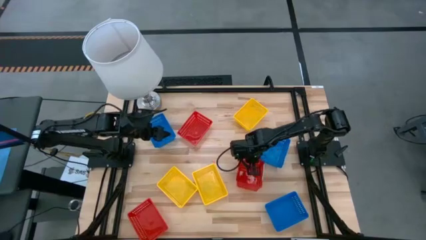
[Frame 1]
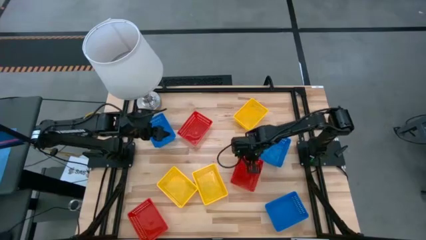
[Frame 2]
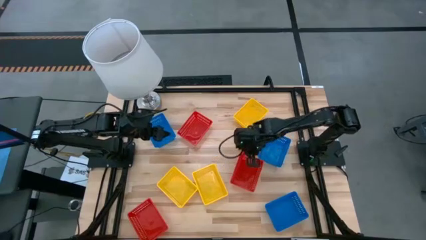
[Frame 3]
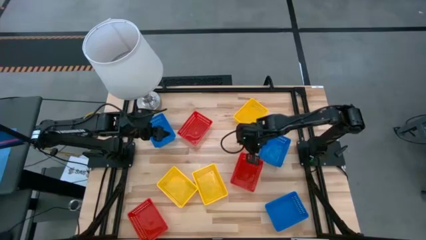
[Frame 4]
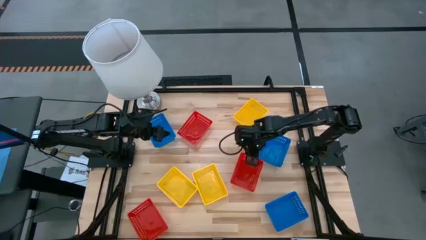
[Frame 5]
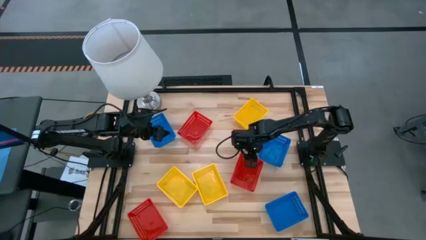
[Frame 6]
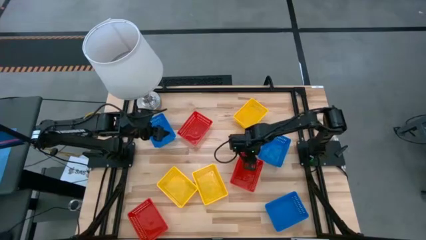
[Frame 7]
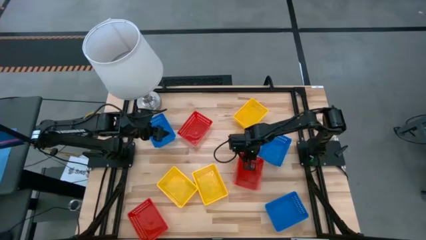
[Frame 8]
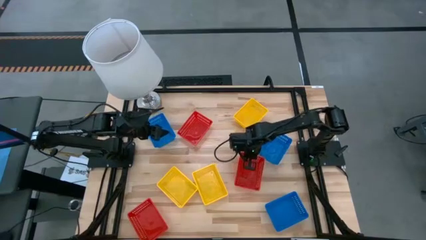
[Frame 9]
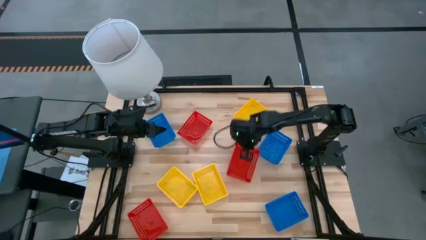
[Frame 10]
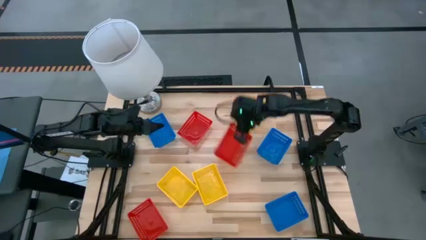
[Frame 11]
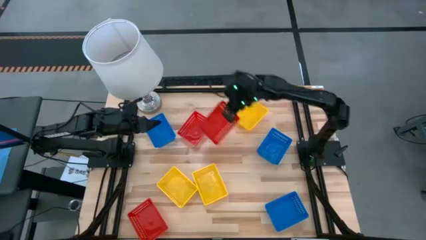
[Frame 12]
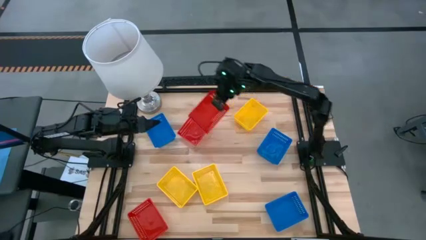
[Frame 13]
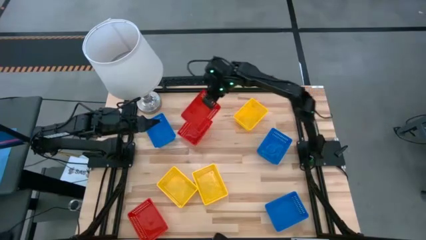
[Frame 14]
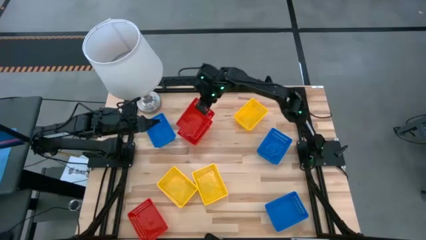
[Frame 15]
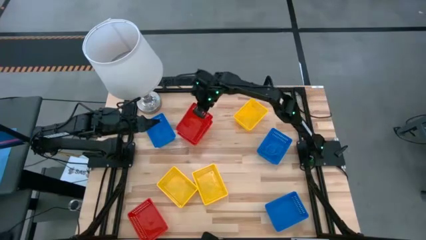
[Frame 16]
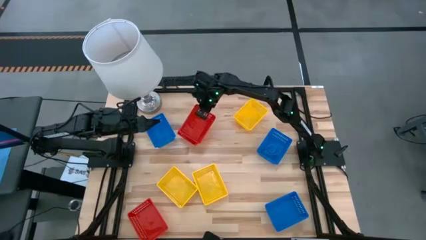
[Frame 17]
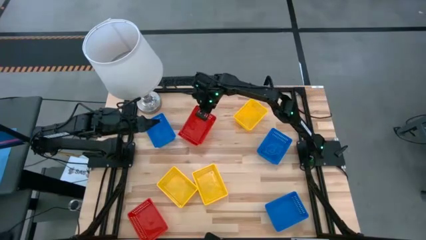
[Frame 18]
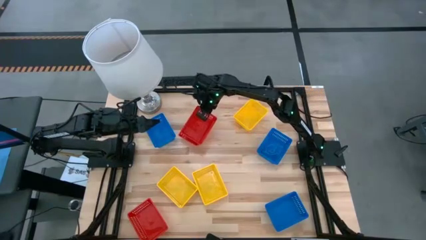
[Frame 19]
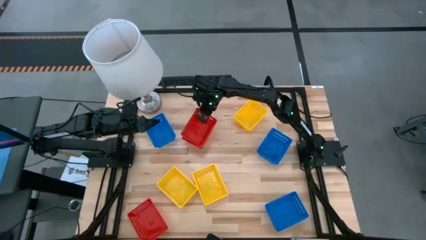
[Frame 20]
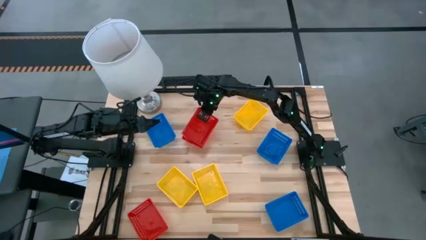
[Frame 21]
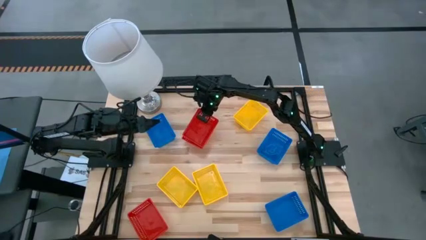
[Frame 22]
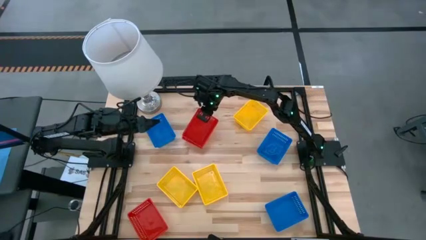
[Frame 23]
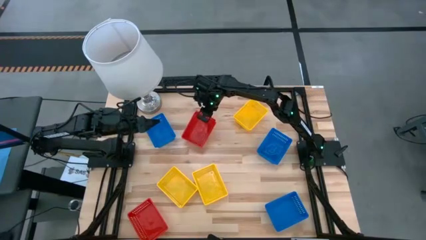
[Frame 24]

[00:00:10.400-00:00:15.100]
Stack the middle right red bin on the top red bin

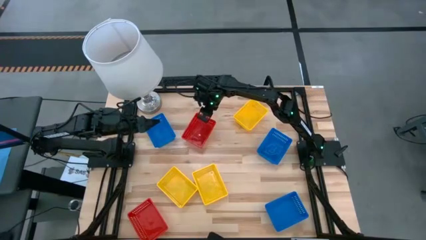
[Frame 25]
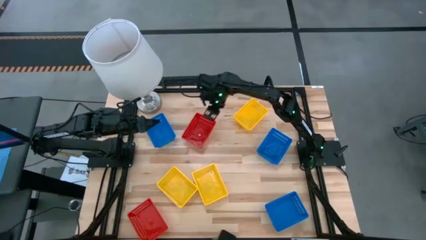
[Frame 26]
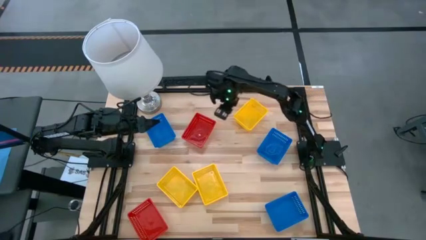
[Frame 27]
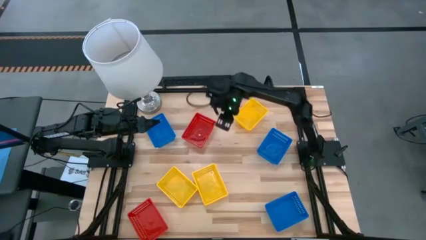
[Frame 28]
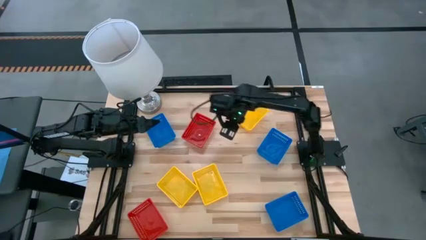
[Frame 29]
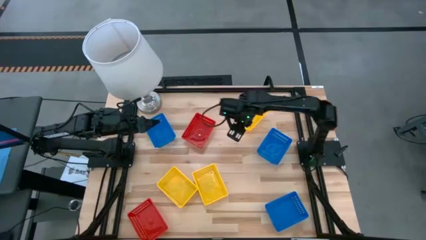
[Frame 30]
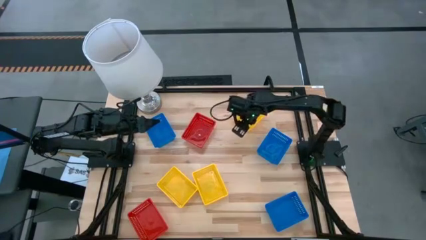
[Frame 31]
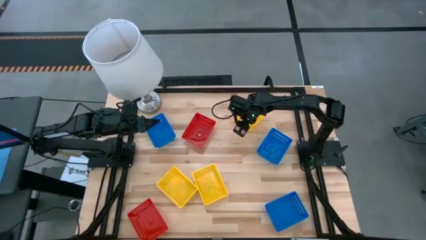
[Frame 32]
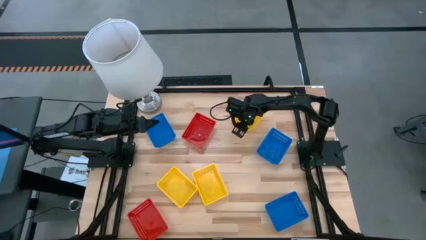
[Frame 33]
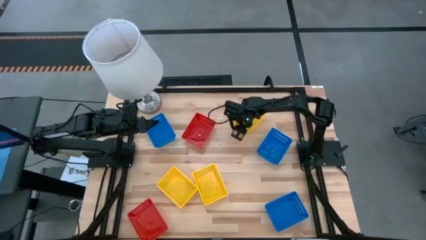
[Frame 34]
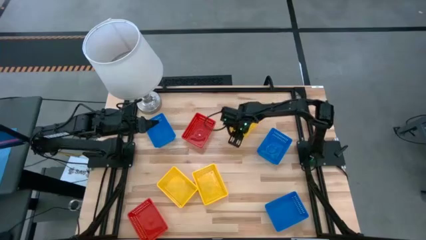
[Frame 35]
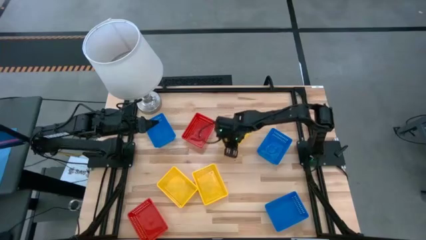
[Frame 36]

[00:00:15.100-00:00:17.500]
Move the top right yellow bin to the right of the stacked bins in the center of the table

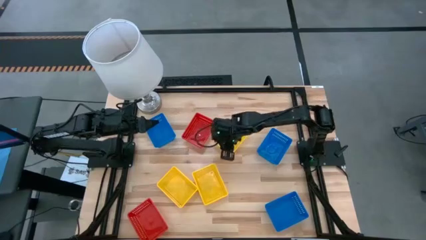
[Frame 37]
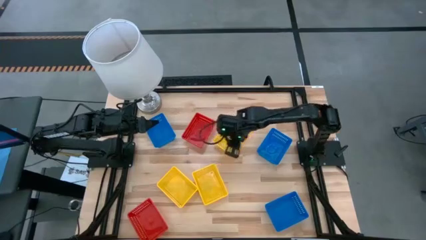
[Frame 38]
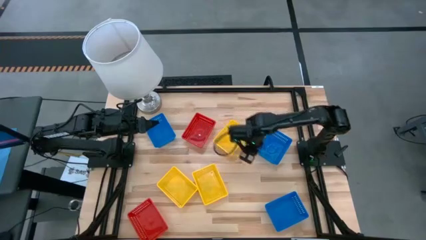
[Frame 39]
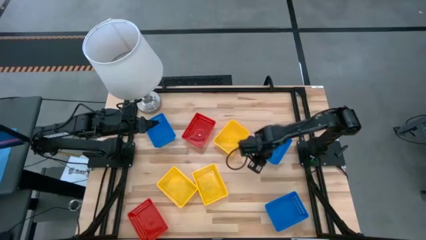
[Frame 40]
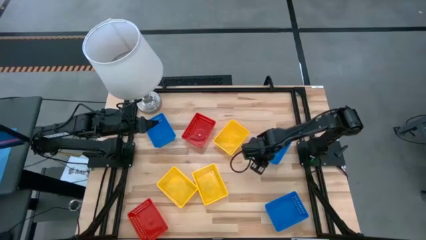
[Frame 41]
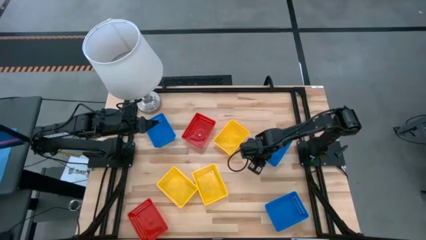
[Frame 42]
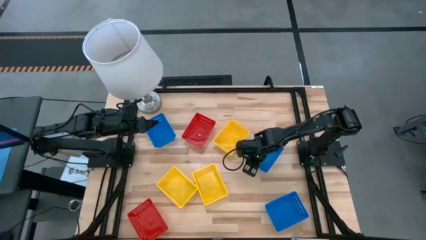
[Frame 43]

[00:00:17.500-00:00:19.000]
Adjust the middle right blue bin

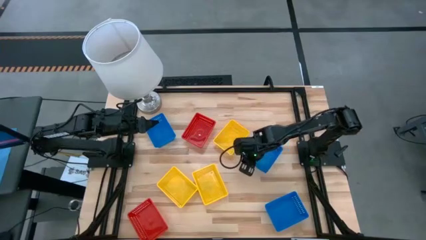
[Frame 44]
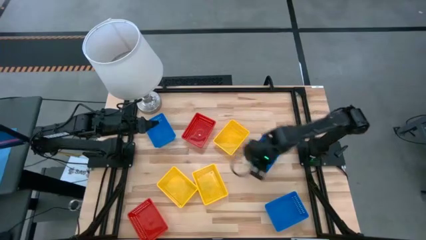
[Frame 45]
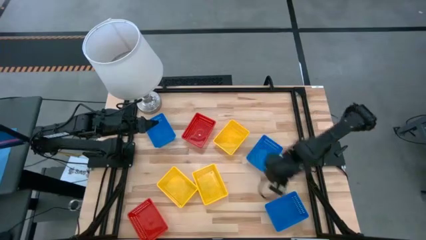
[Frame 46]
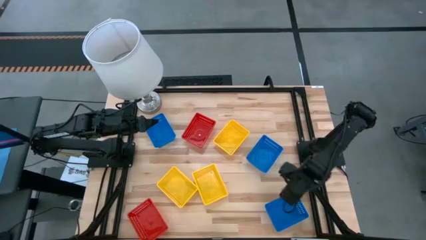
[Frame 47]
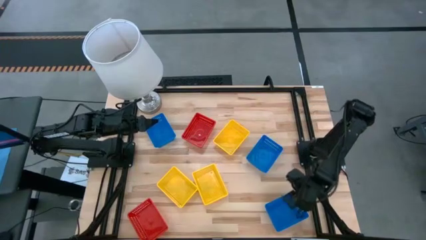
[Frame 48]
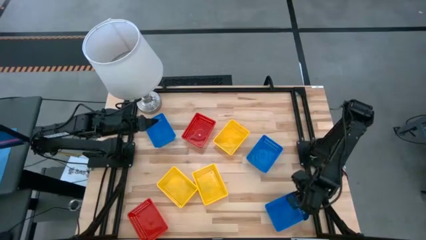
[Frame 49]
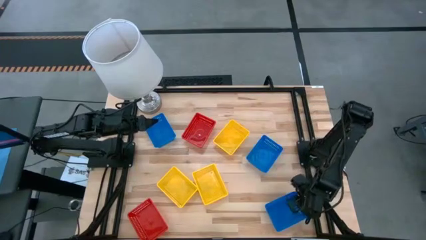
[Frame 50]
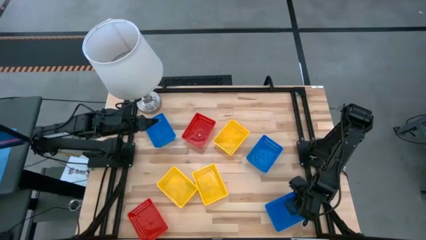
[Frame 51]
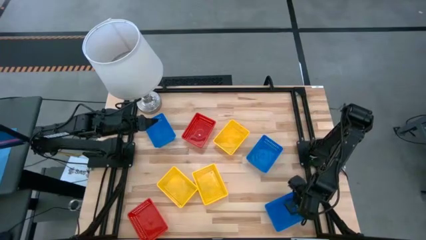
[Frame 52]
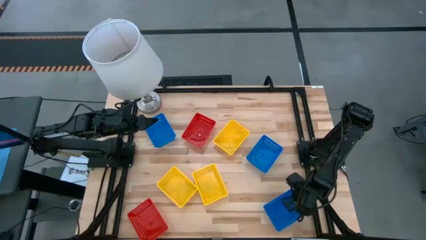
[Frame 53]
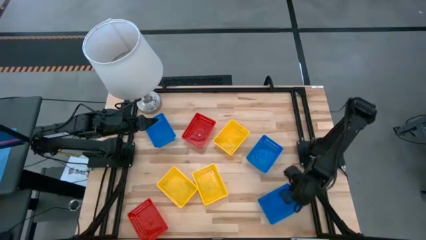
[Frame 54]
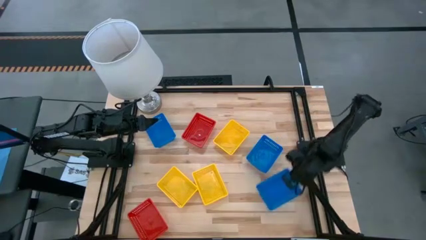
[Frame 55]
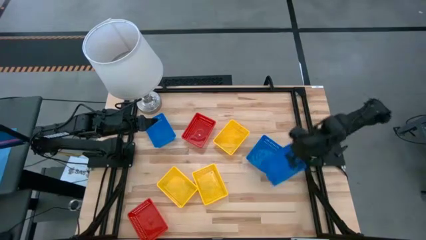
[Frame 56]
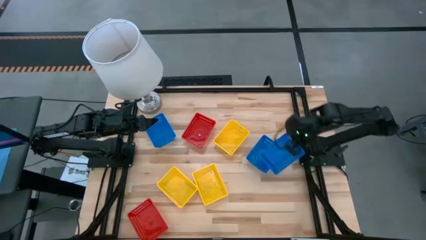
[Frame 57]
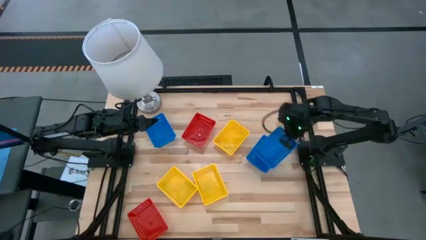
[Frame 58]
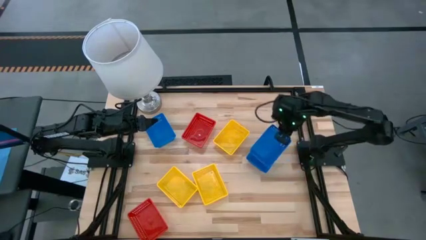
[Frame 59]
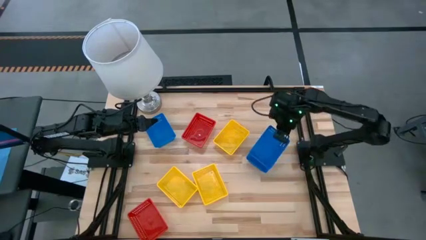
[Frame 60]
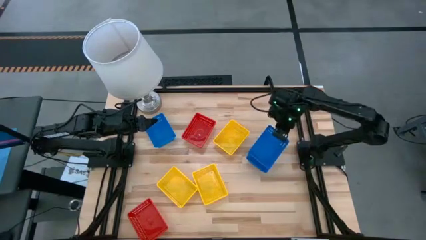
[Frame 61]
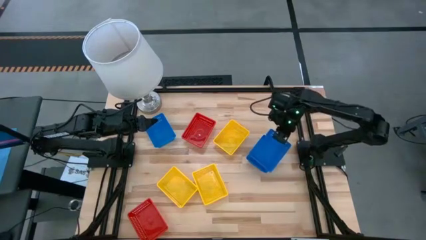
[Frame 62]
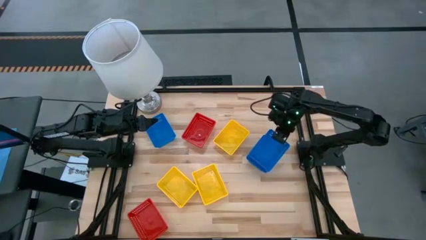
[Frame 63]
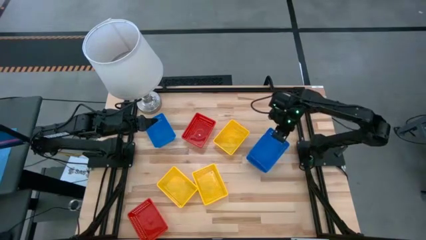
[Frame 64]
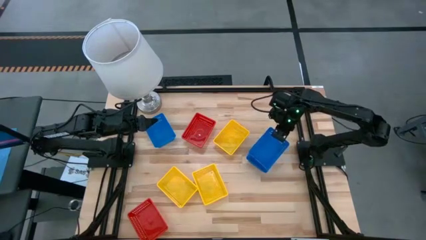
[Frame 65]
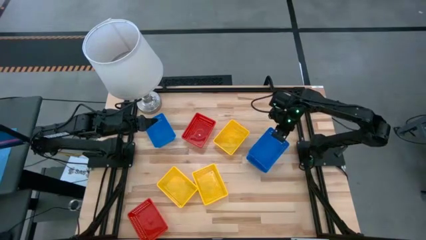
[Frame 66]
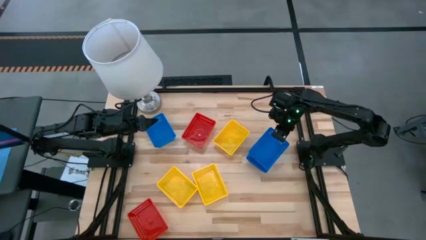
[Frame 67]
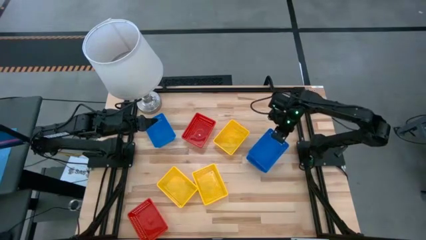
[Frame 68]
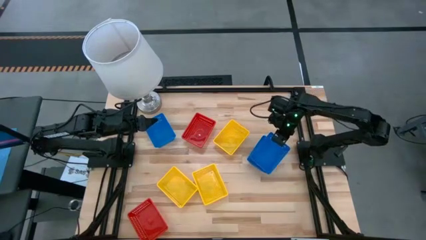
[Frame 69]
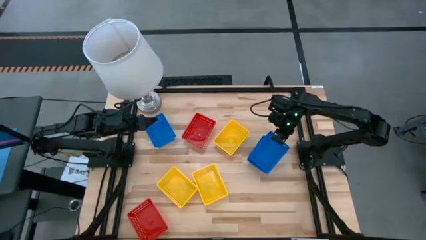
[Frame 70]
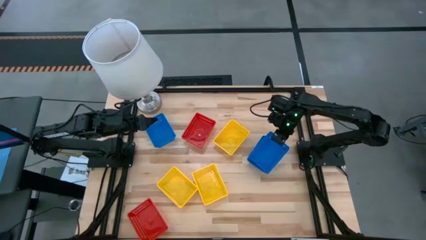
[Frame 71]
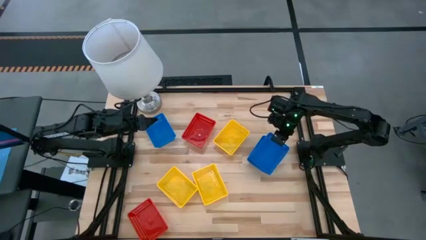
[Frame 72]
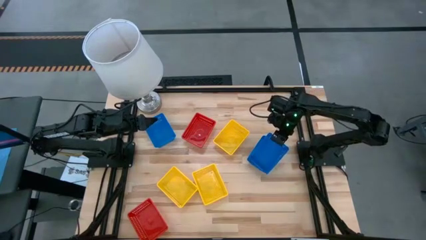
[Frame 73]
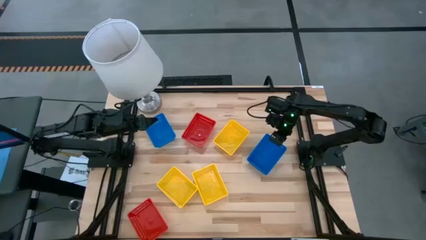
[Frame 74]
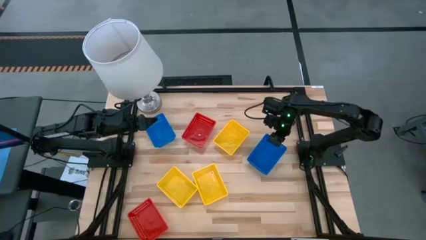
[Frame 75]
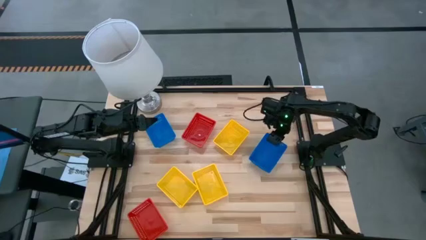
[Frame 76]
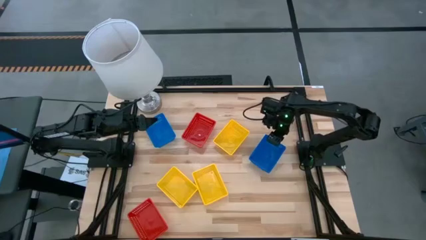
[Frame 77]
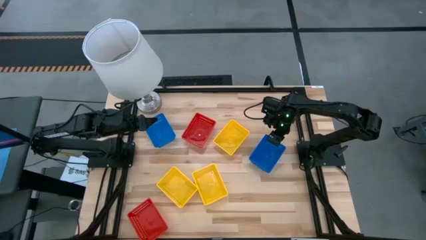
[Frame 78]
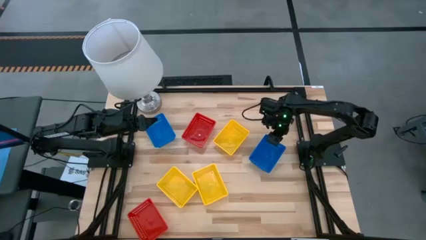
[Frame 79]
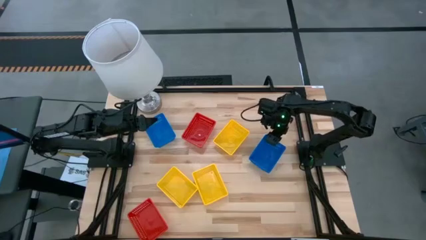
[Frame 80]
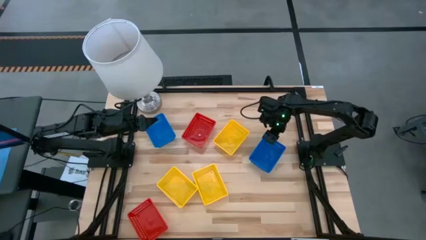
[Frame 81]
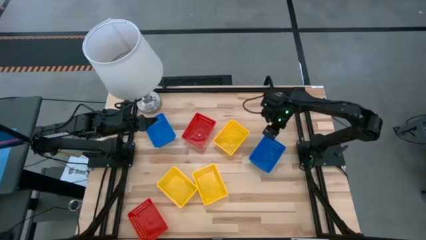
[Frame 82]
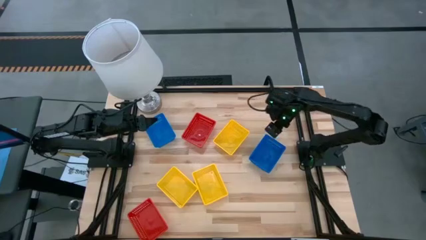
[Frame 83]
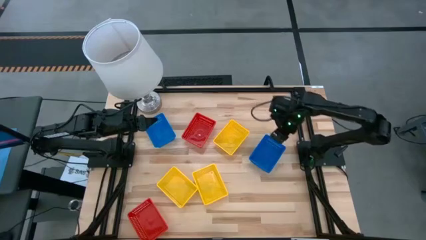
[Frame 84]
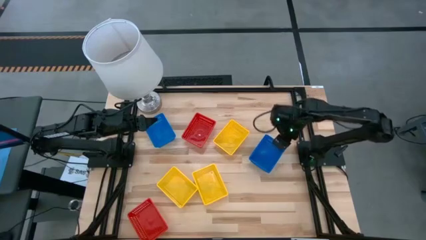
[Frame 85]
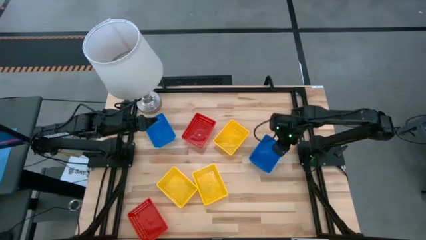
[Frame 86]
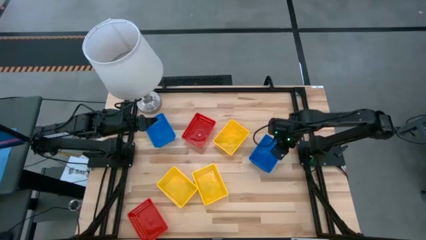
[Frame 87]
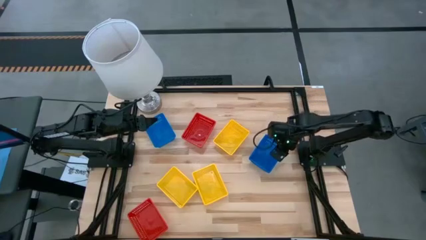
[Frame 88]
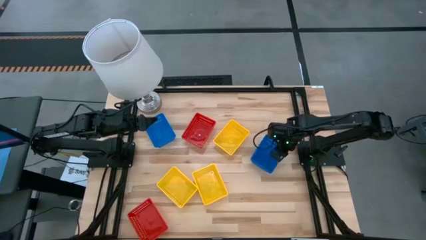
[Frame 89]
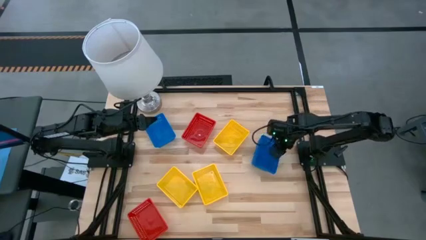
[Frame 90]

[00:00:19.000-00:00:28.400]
Stack the bottom blue bin on the middle right blue bin
